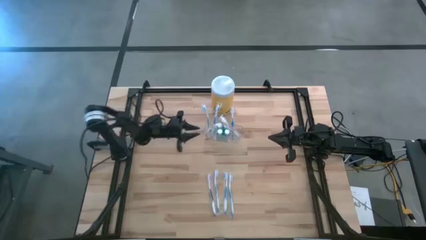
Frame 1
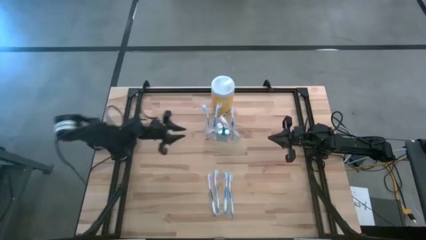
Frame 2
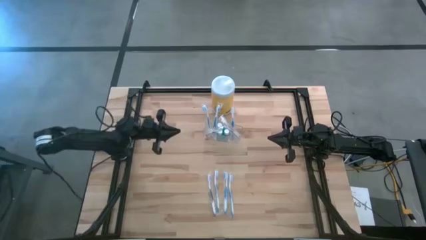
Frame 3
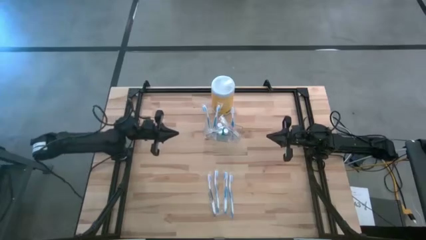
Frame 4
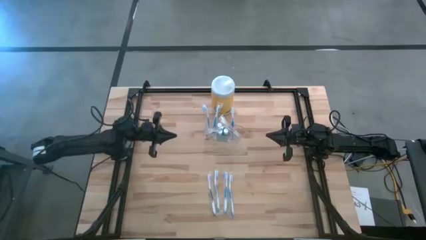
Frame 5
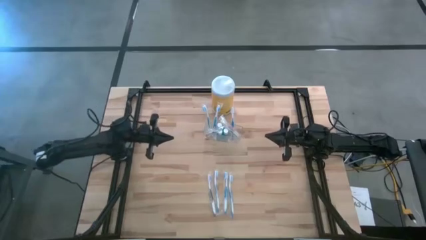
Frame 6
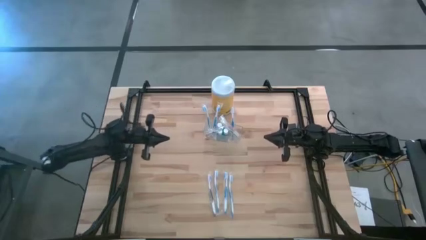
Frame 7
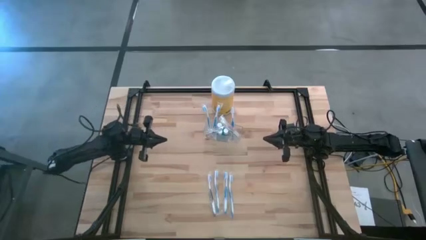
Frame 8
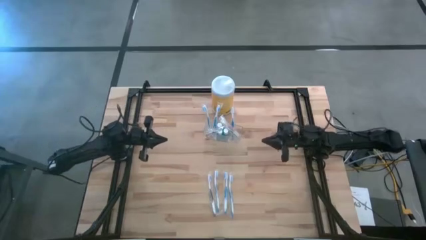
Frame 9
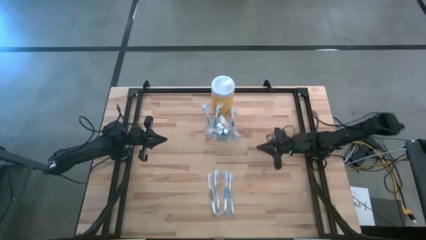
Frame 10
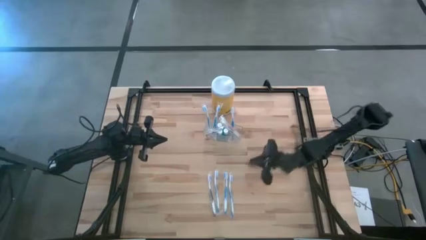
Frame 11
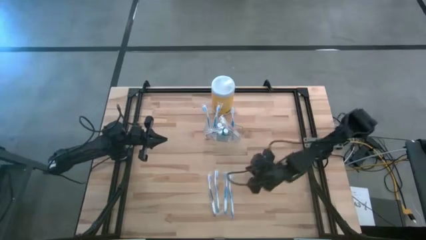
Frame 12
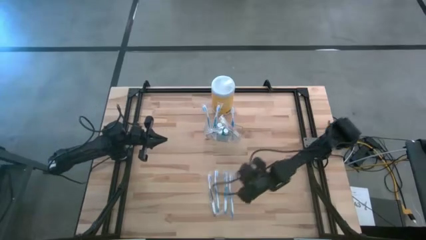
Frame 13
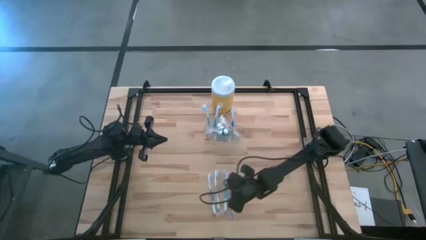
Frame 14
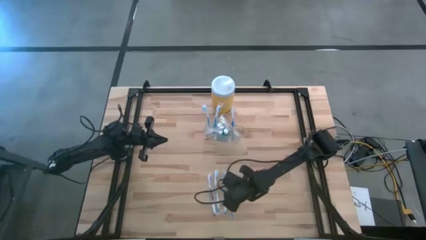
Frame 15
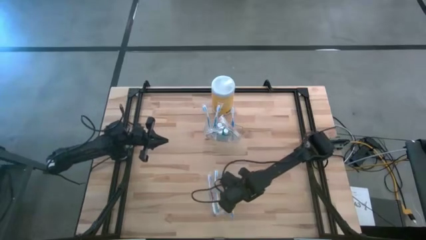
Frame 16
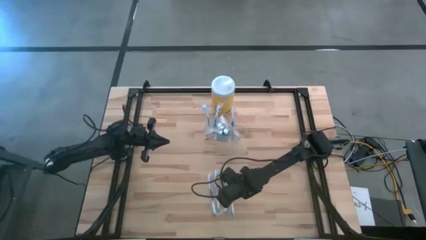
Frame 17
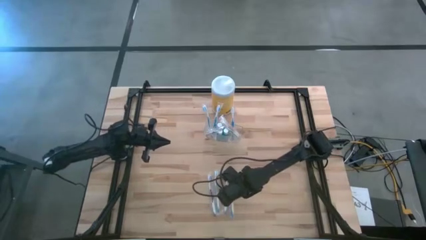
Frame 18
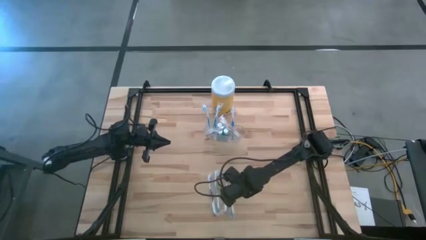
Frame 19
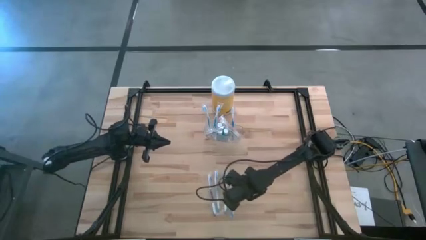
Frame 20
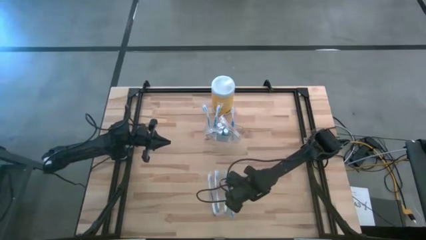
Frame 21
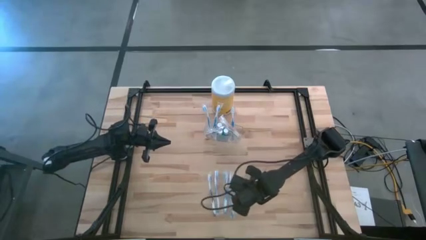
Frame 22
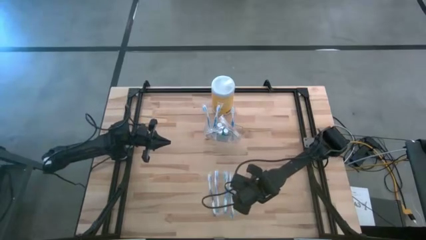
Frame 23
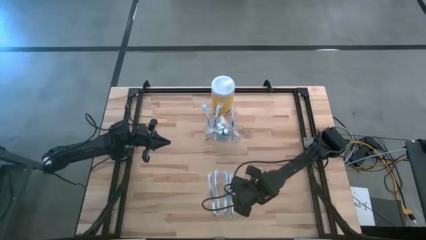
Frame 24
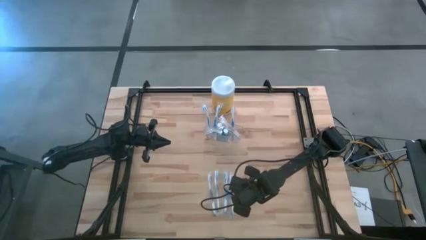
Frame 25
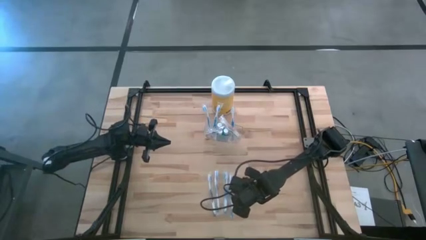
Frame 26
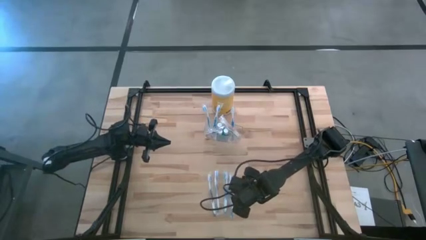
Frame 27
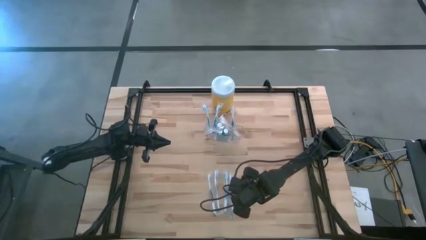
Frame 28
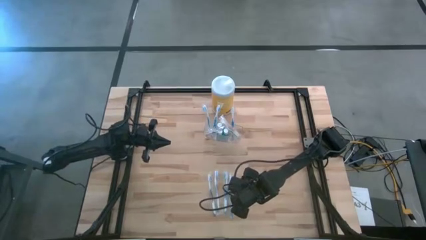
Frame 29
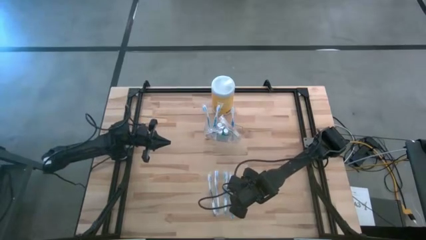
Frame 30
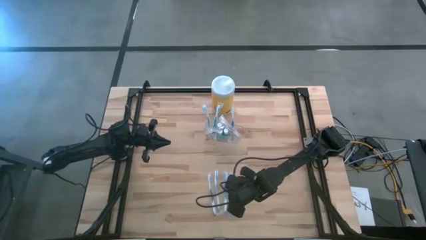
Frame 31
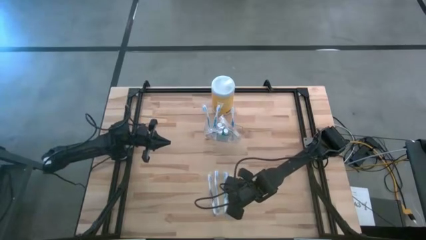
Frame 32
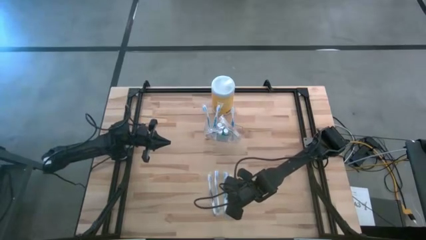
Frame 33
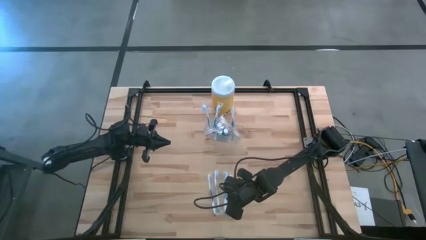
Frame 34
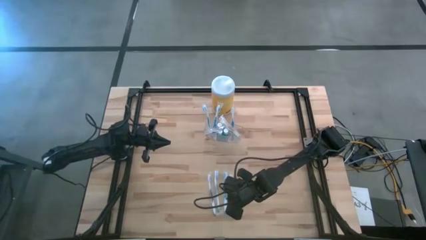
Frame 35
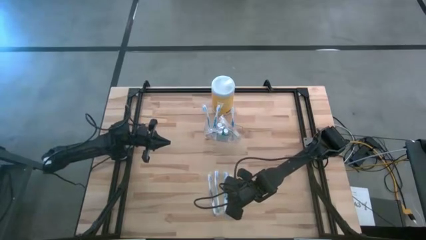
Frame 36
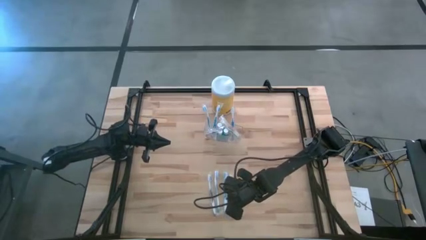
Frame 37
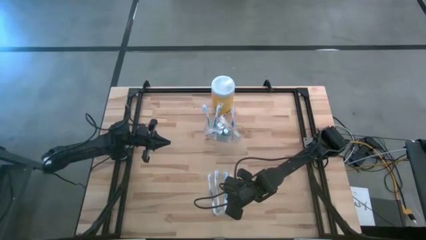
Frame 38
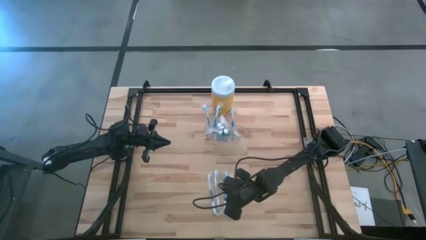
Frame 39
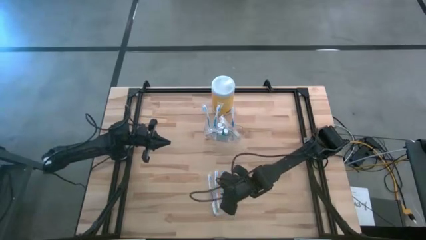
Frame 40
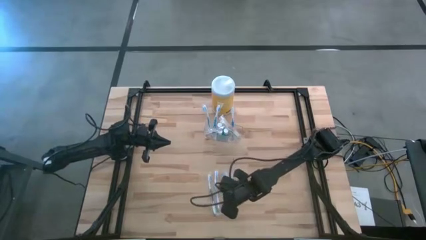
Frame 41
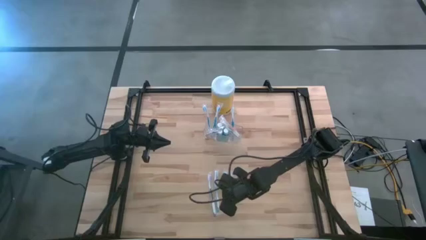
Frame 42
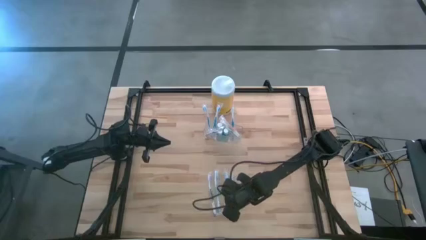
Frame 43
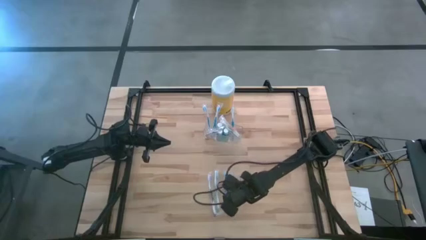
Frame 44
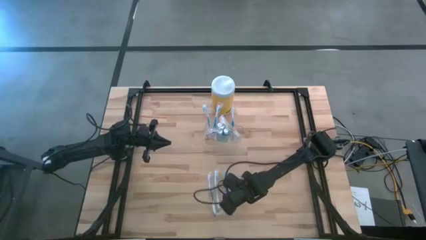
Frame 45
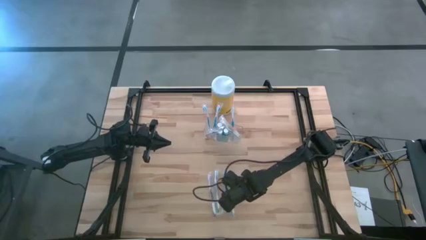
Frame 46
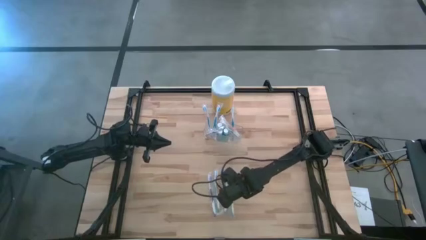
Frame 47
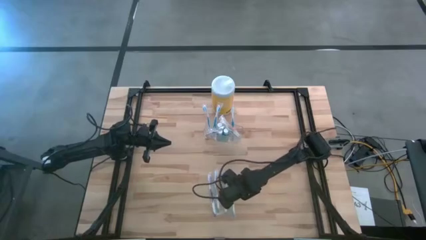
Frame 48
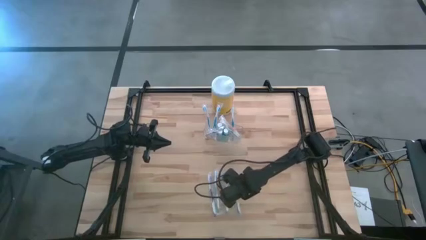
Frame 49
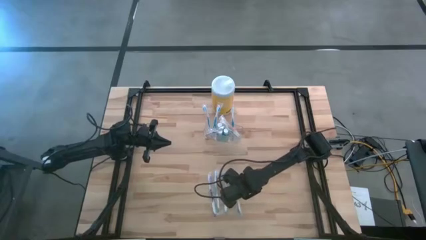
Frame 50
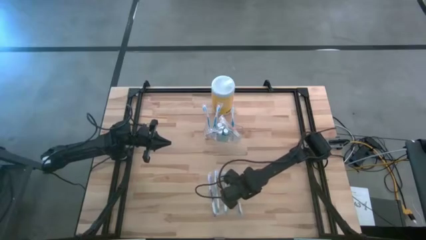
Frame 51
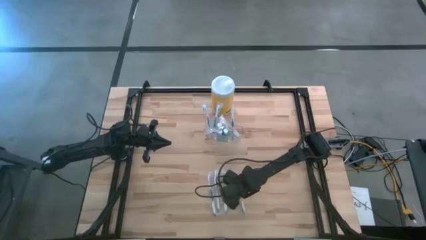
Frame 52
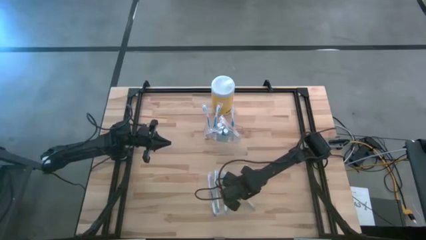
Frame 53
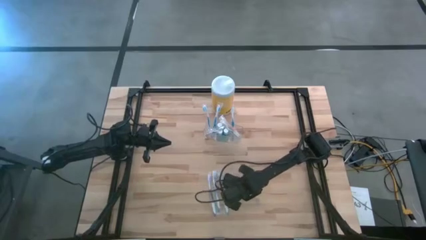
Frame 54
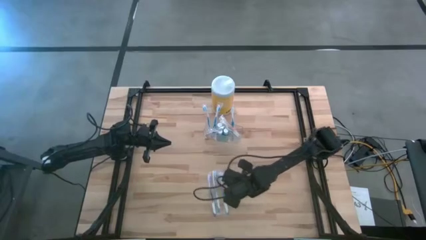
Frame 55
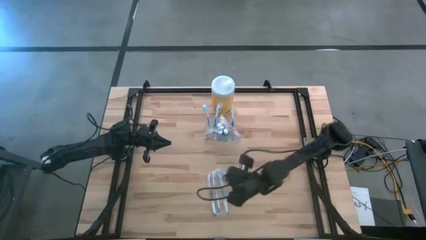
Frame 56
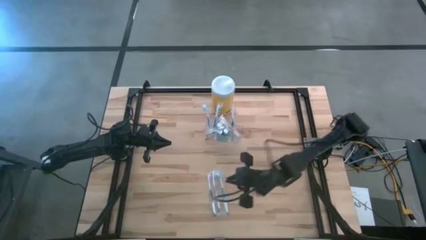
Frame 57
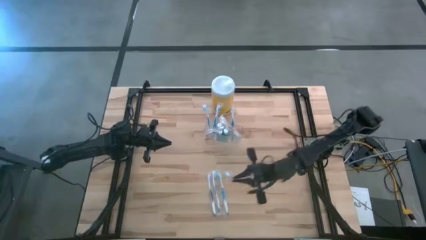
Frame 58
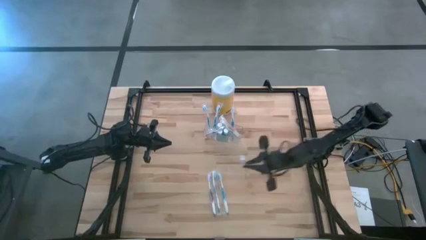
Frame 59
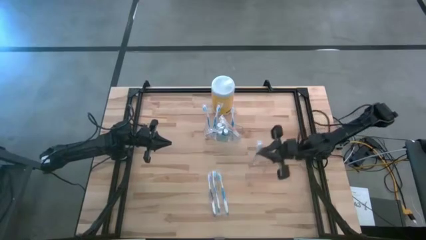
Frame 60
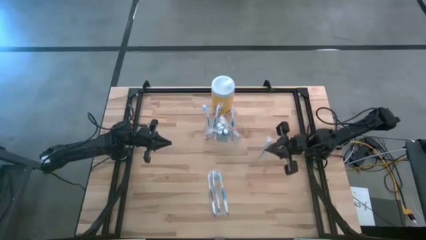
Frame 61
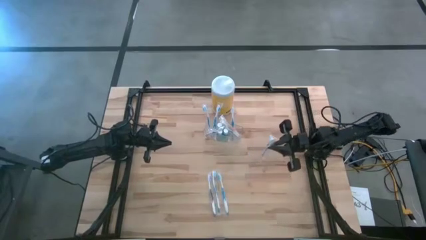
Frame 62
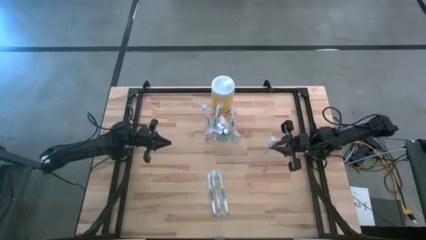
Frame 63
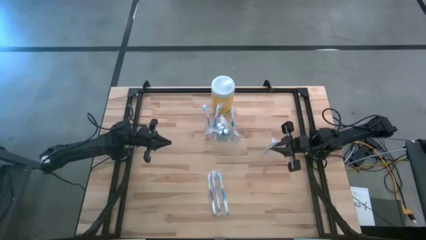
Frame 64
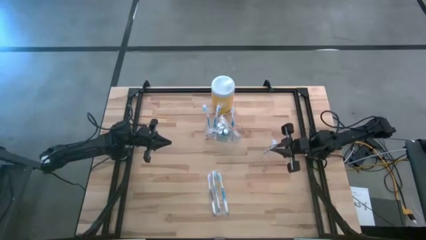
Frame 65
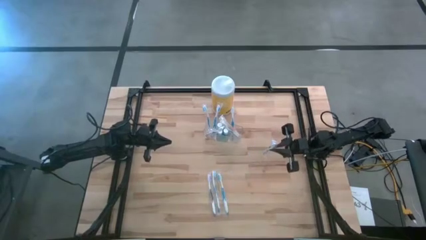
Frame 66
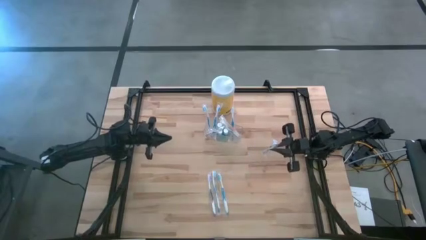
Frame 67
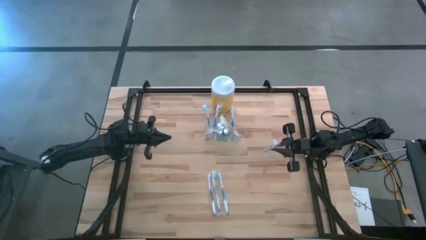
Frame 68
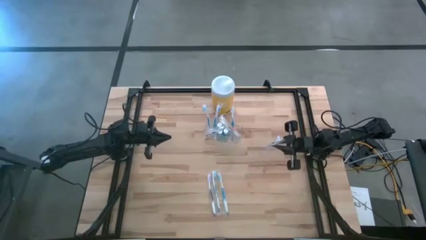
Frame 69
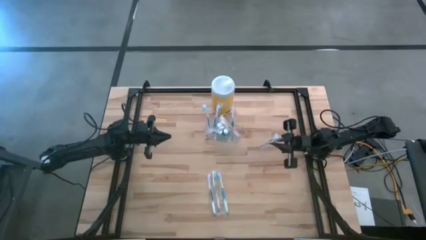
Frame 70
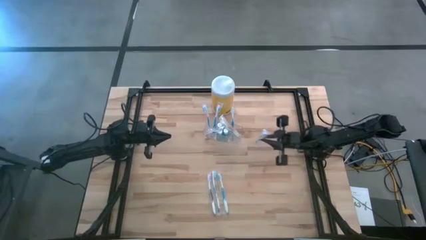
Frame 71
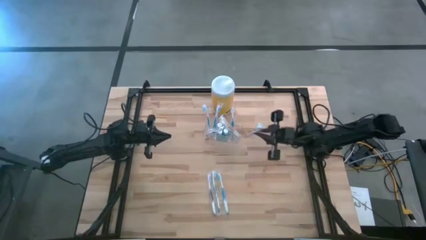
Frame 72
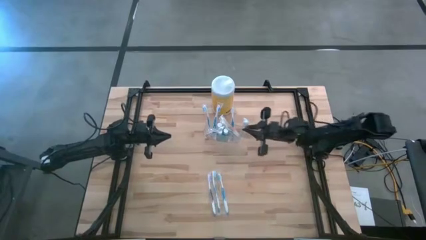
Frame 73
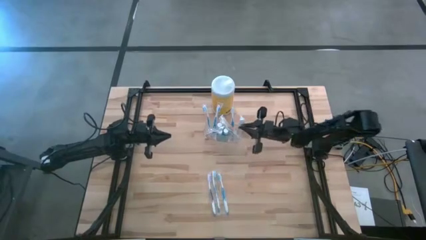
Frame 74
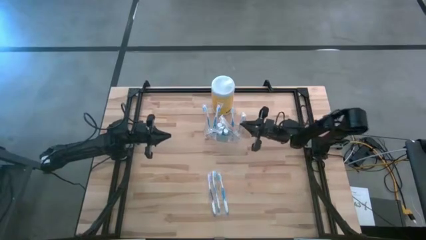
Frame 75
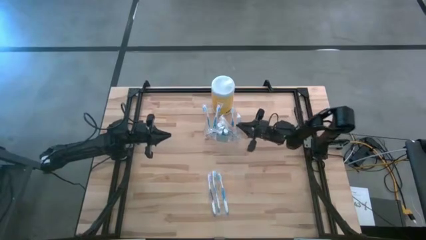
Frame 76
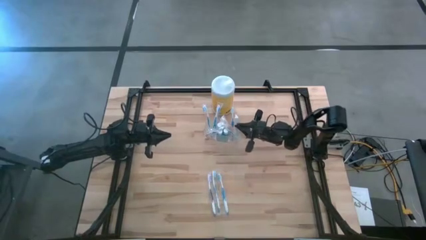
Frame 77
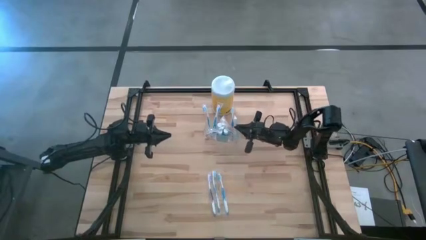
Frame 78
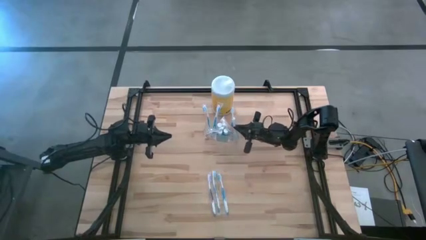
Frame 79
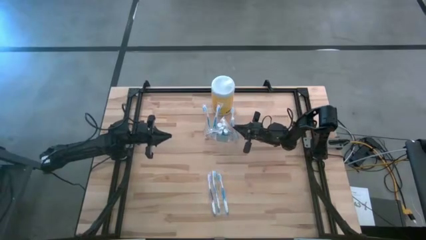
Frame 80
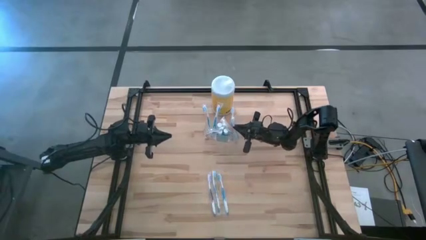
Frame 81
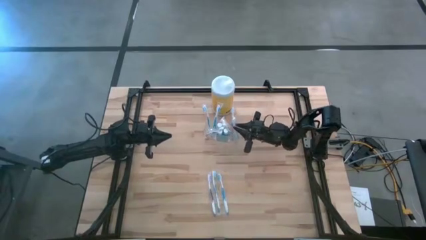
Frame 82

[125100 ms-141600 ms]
Task: Pick & Place toothbrushing station
Put the blue toothbrush into the transparent organizer
